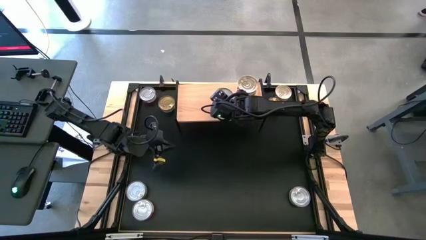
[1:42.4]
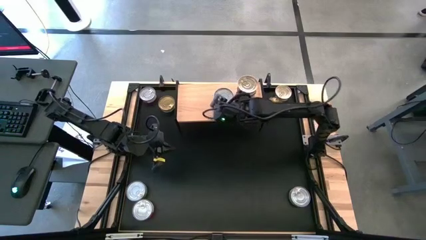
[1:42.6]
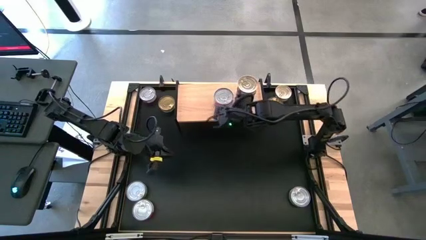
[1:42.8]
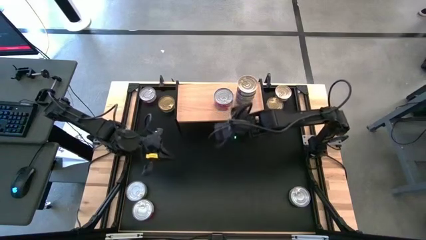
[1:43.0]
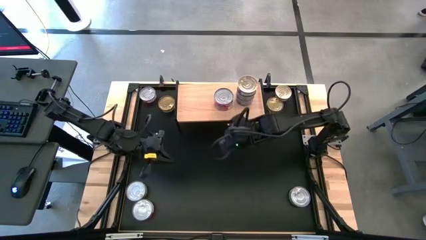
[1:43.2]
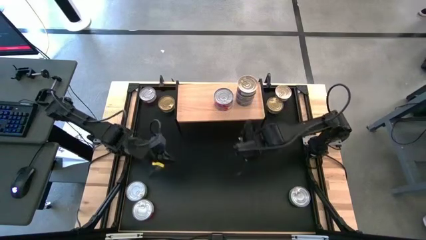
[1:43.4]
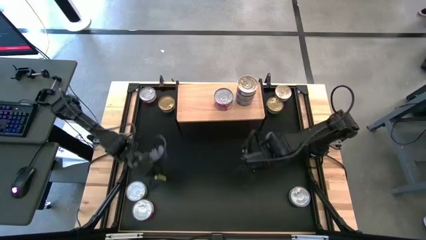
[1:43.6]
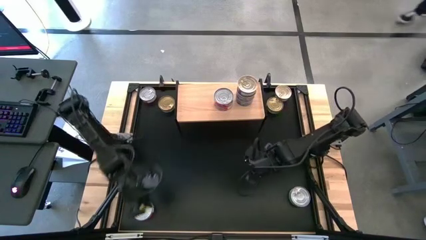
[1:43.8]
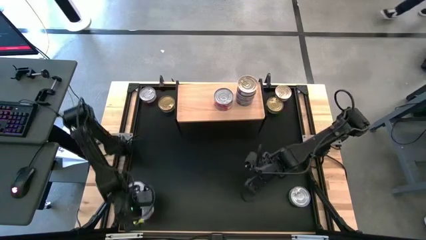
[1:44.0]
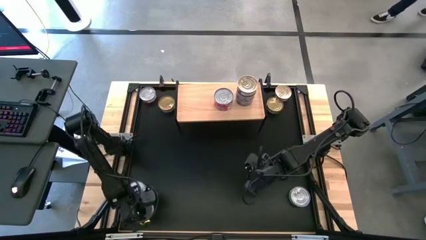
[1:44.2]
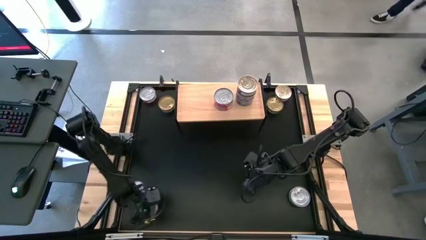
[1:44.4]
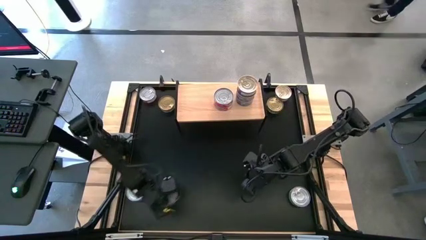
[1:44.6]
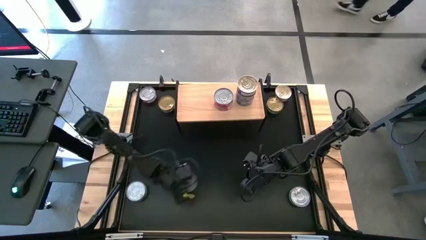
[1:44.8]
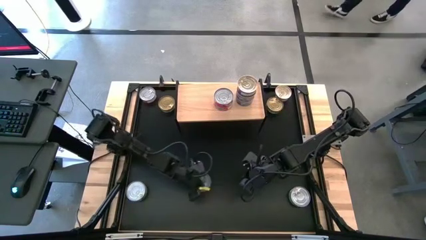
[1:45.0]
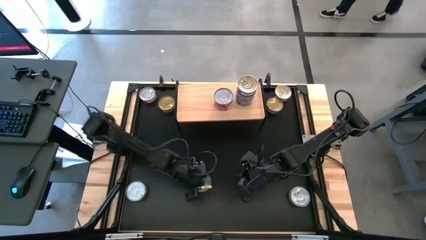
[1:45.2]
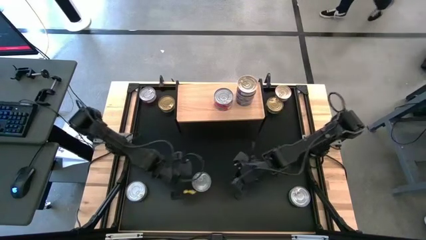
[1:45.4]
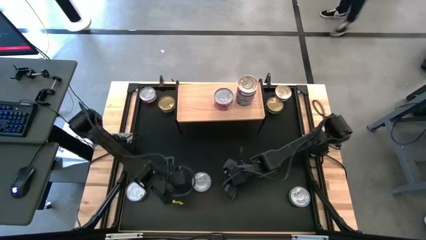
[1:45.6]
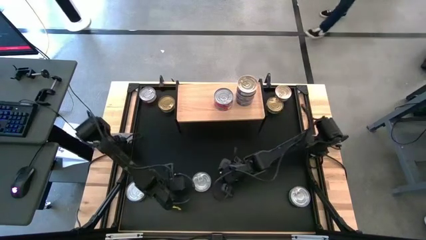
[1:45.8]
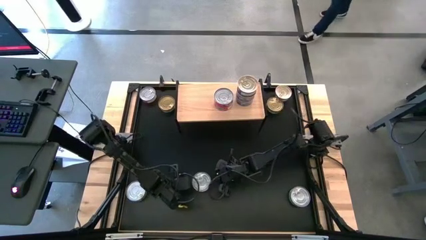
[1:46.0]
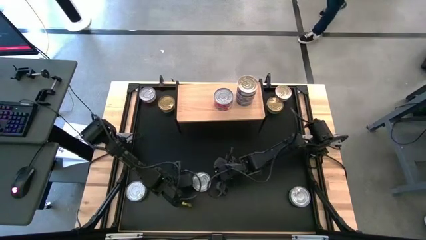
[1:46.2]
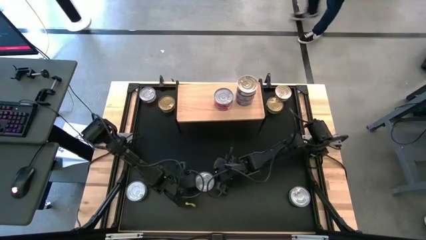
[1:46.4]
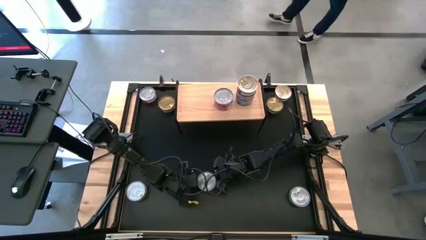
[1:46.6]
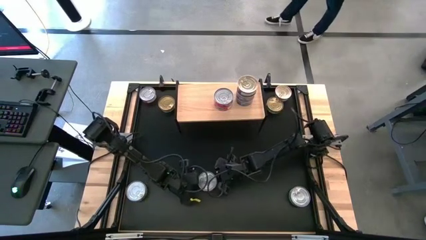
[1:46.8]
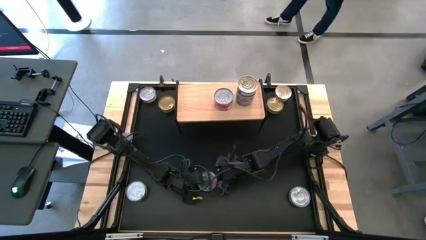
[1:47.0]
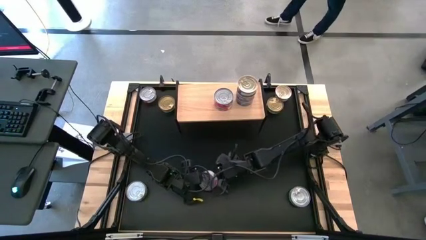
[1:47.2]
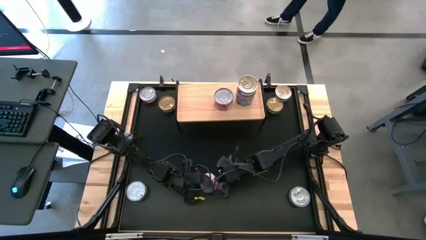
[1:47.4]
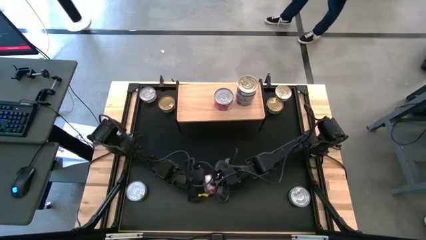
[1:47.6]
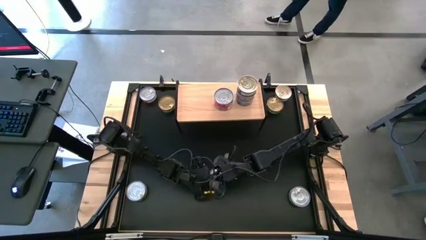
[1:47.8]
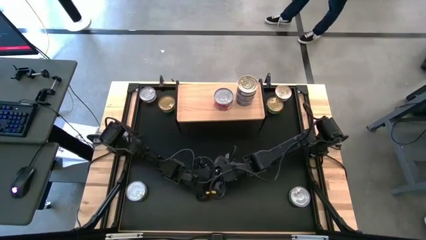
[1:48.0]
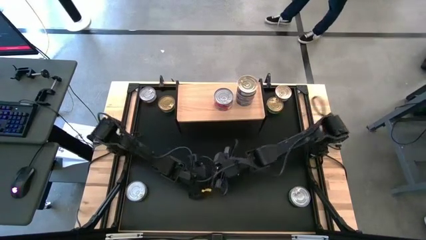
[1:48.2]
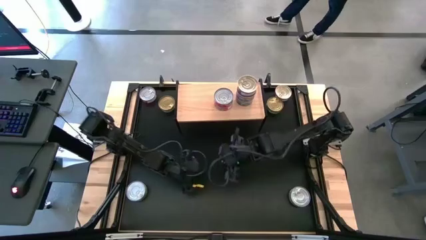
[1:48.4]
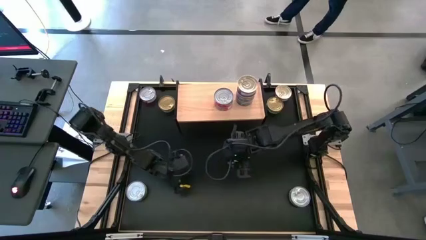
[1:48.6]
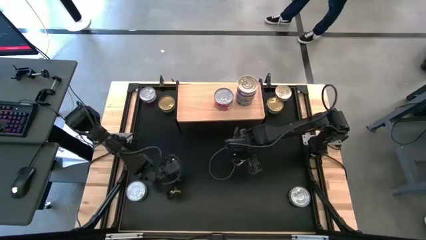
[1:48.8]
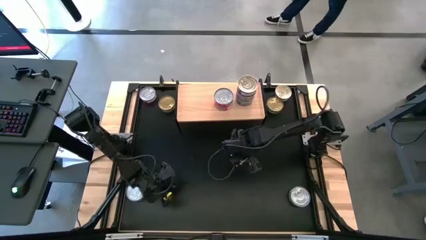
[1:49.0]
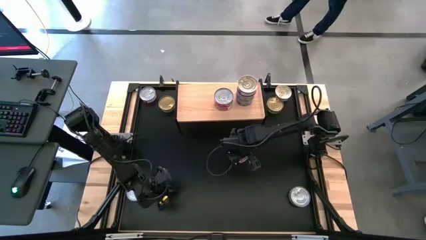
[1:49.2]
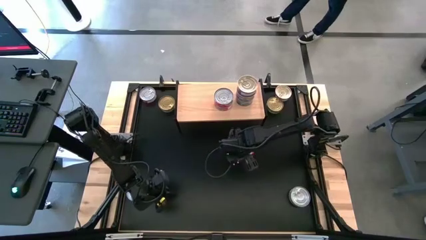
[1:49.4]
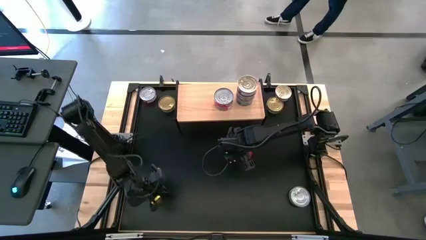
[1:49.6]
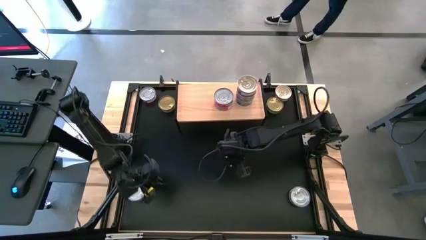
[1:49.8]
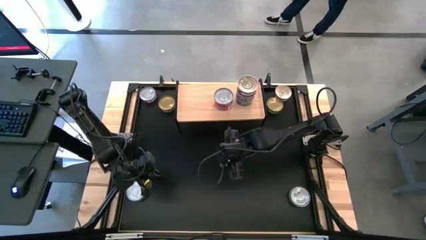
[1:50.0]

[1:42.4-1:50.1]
Task: Stack canned seafood by type on shelf
Stack the red tuna can on top of the red tuna can on the shelf

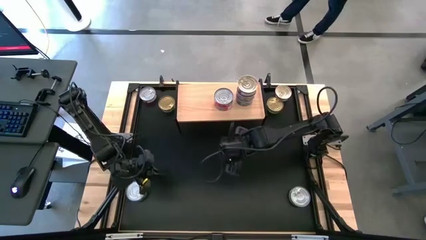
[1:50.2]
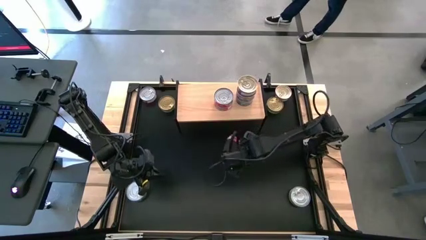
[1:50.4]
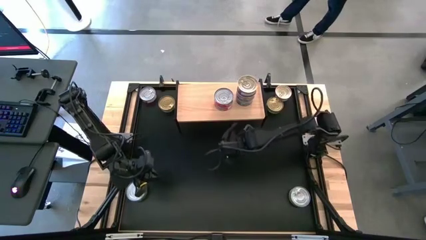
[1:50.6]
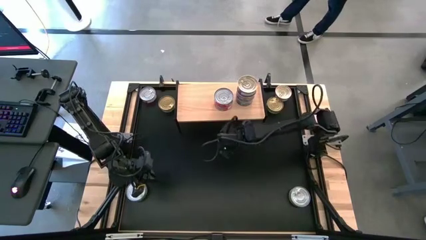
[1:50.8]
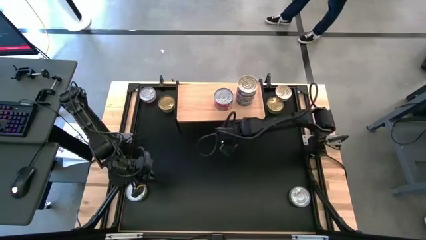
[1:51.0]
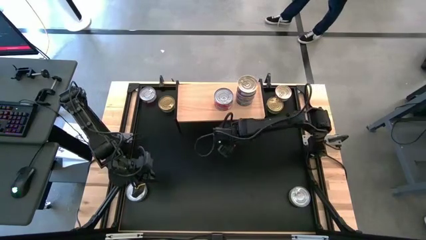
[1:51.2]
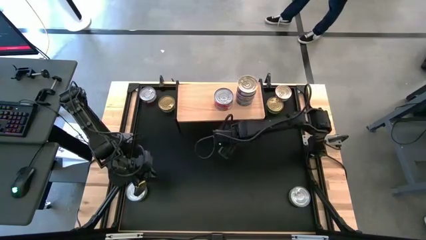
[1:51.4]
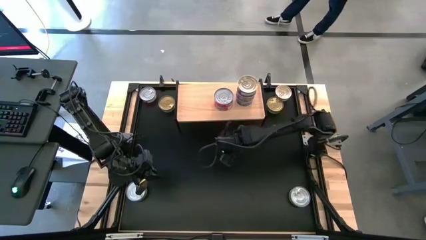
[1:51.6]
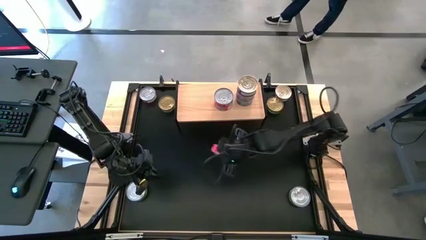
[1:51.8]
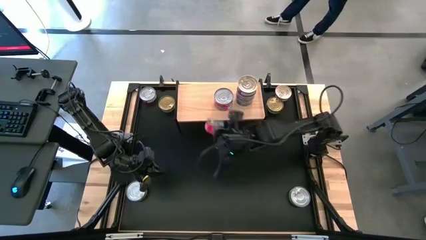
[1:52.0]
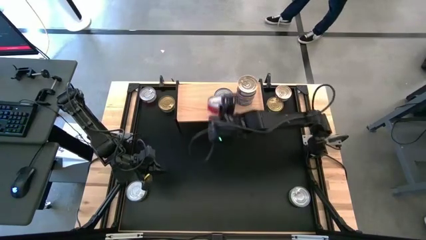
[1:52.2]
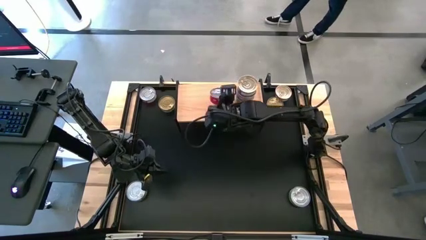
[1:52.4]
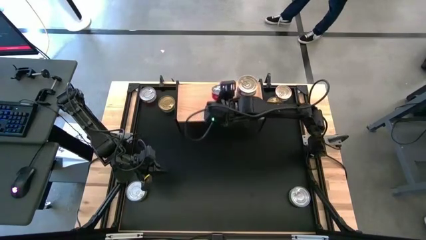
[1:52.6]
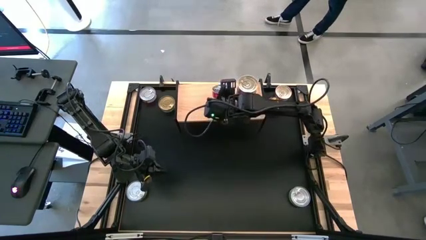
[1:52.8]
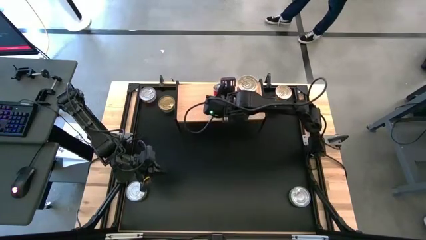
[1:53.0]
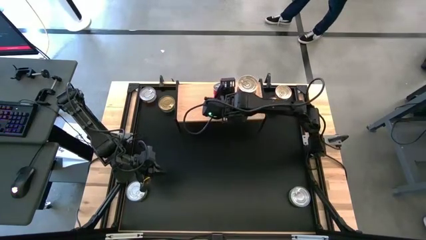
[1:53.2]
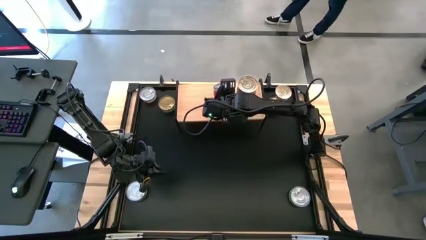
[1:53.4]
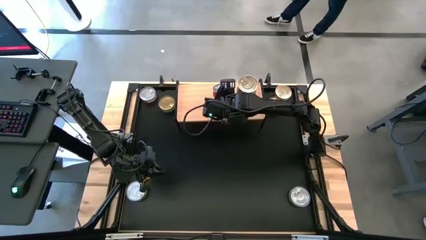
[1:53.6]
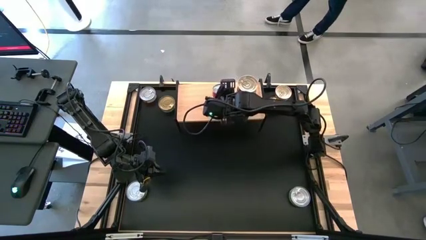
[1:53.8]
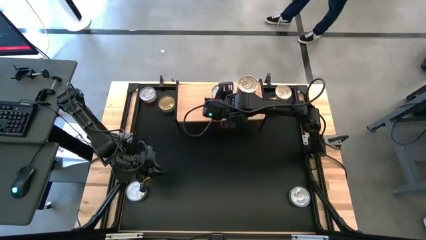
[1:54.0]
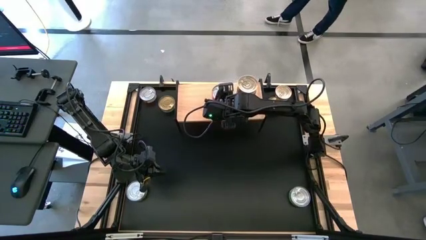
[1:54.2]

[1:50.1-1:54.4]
Stack the red tuna can on top of the red tuna can on the shelf
